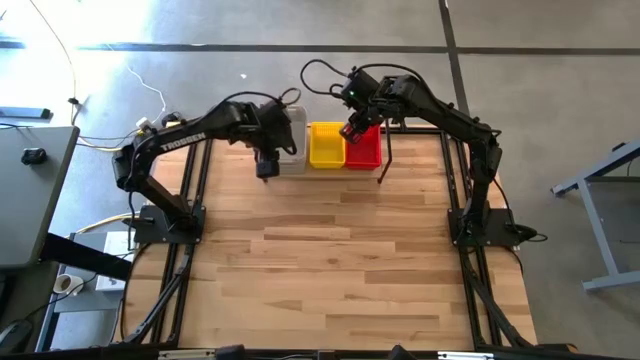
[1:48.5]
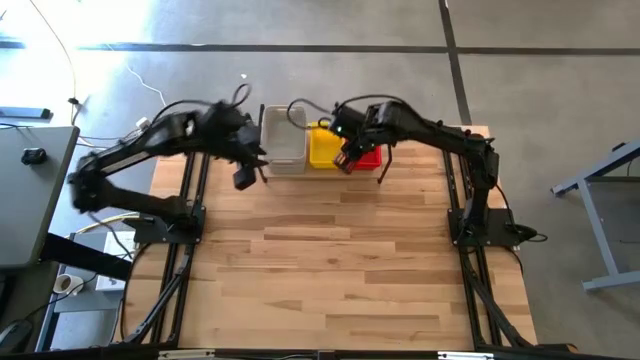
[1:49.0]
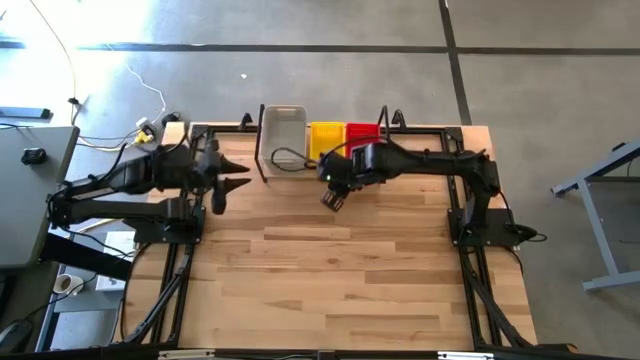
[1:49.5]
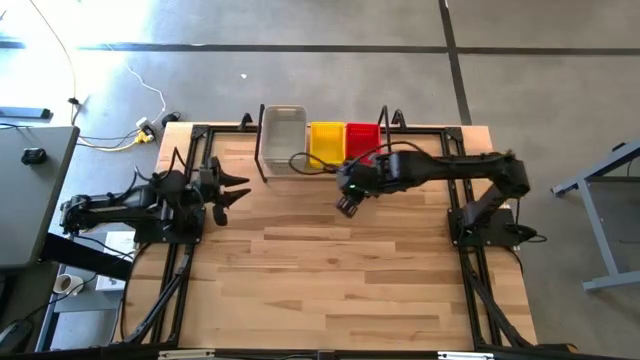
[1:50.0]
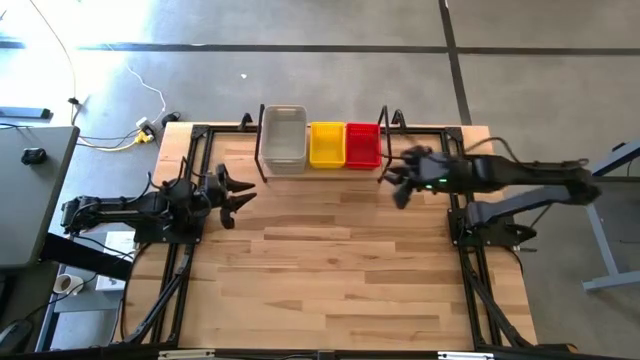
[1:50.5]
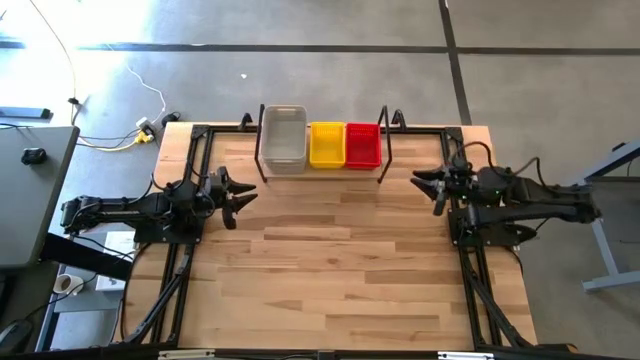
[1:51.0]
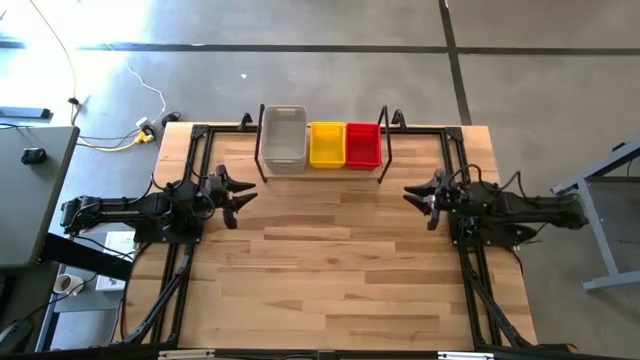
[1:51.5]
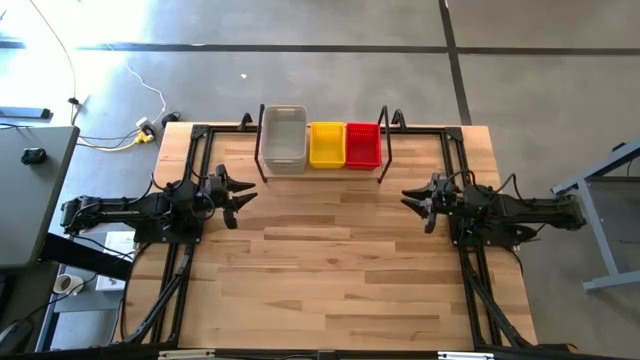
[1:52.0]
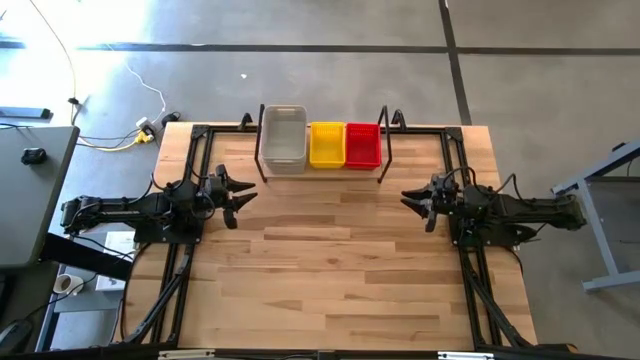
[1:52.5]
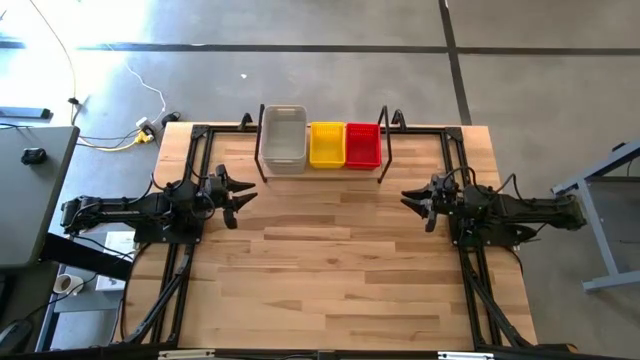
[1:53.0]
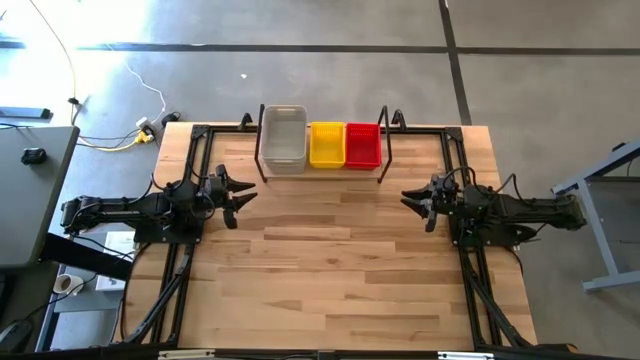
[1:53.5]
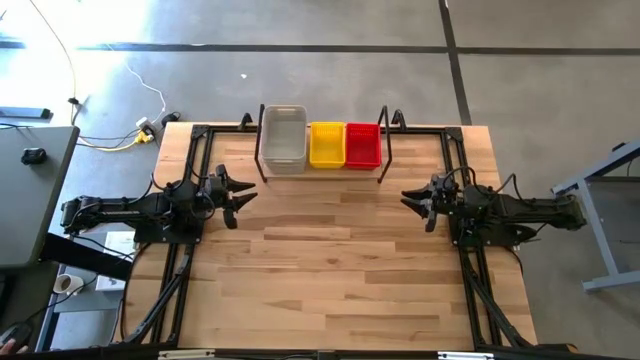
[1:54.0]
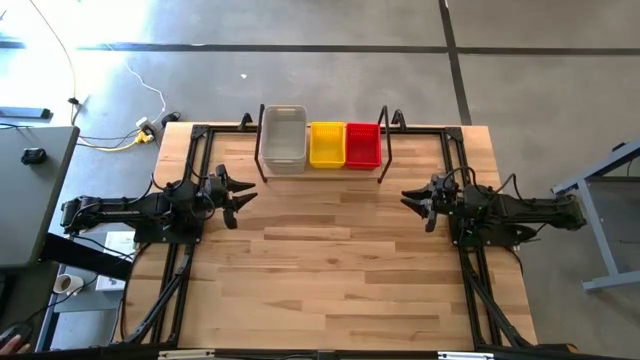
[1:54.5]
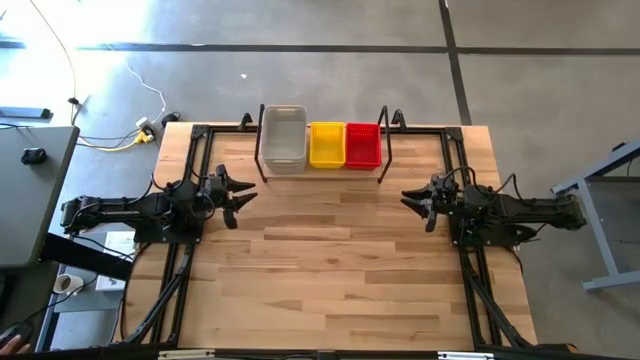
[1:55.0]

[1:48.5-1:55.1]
Task: Stack baskets on shelf by color
Return to Home Position

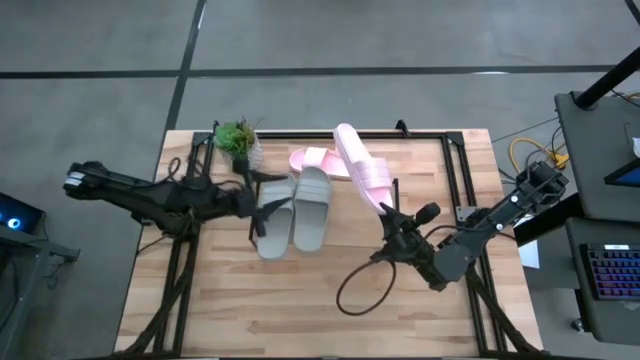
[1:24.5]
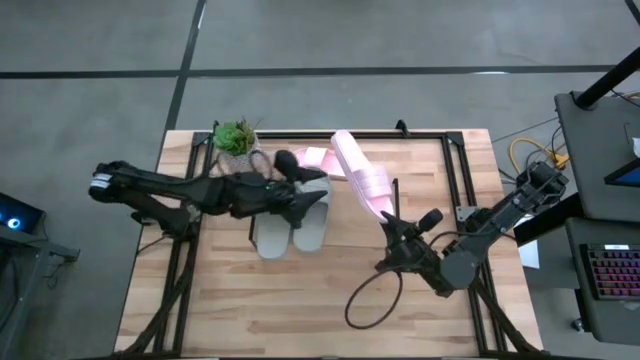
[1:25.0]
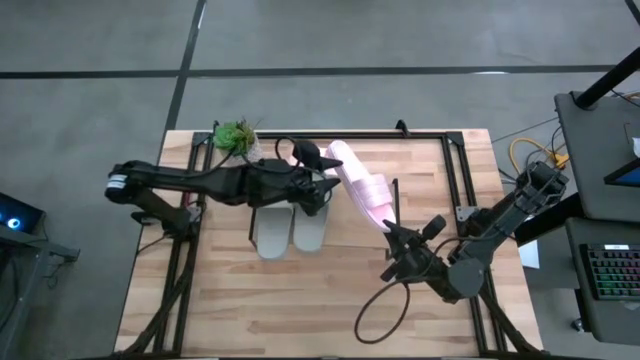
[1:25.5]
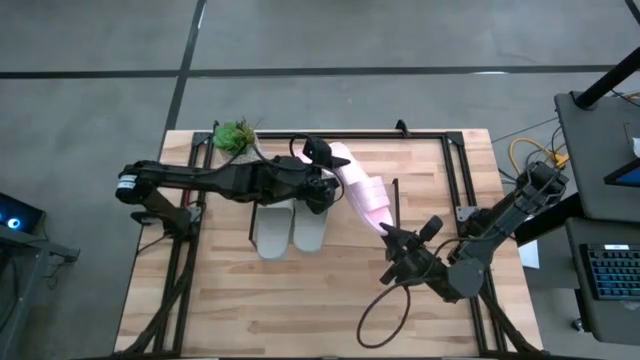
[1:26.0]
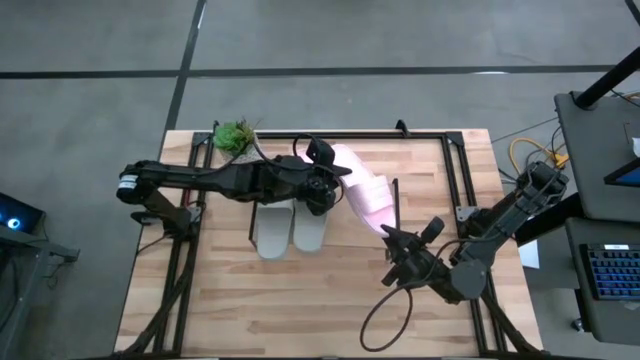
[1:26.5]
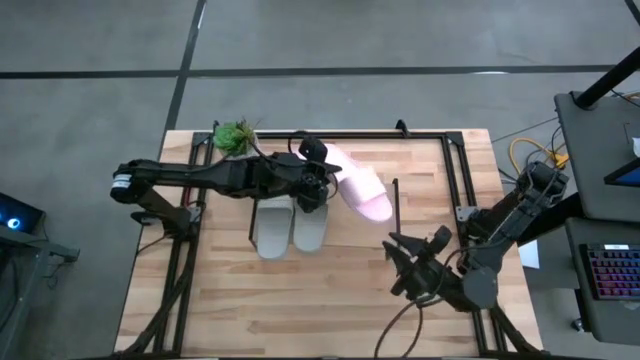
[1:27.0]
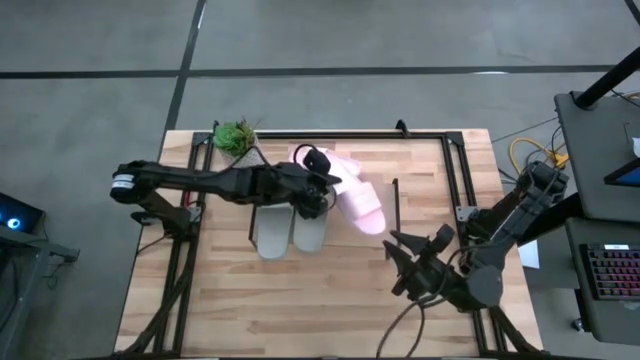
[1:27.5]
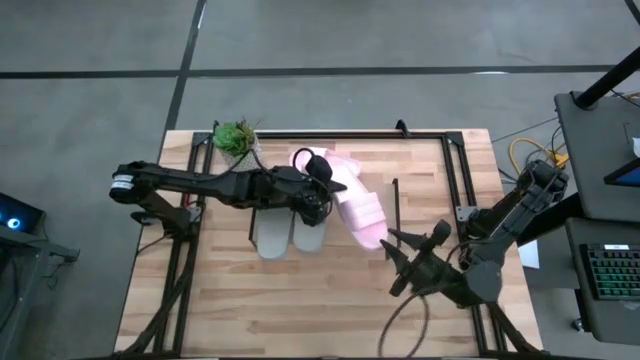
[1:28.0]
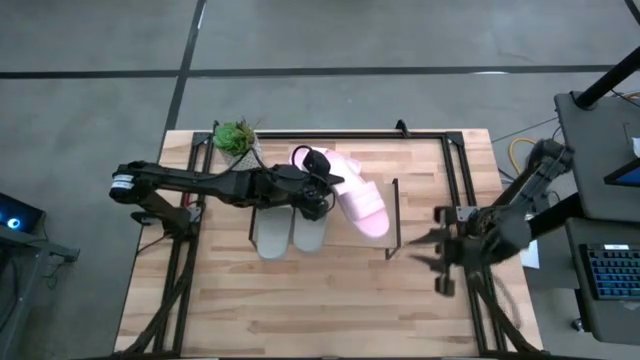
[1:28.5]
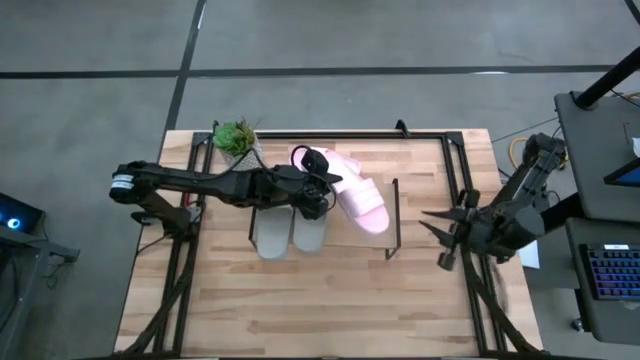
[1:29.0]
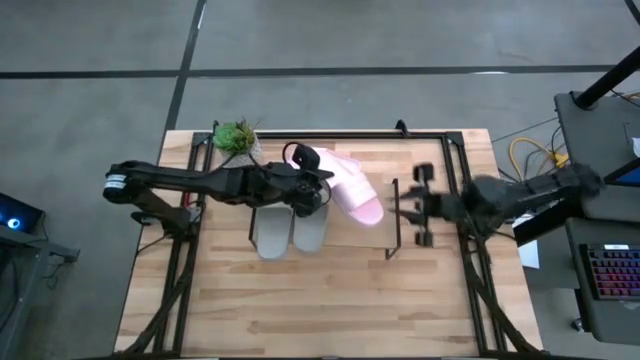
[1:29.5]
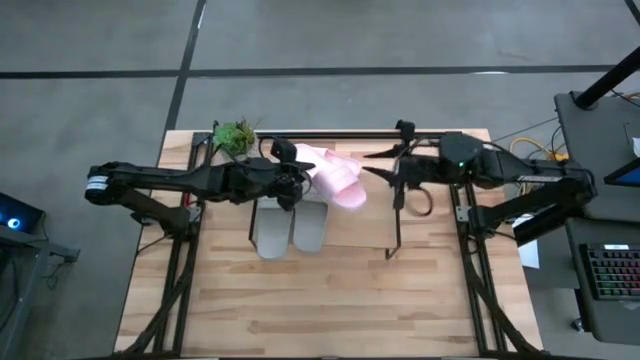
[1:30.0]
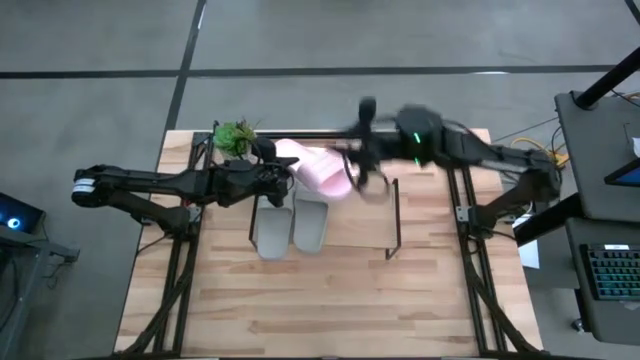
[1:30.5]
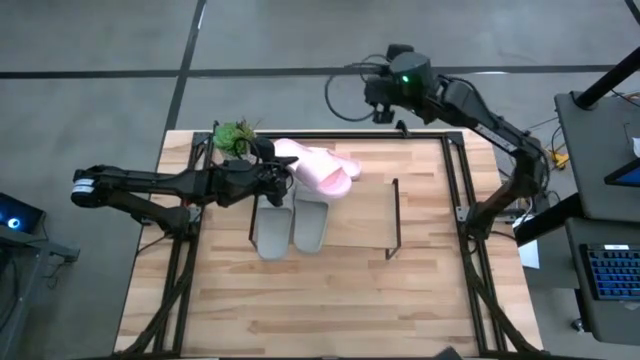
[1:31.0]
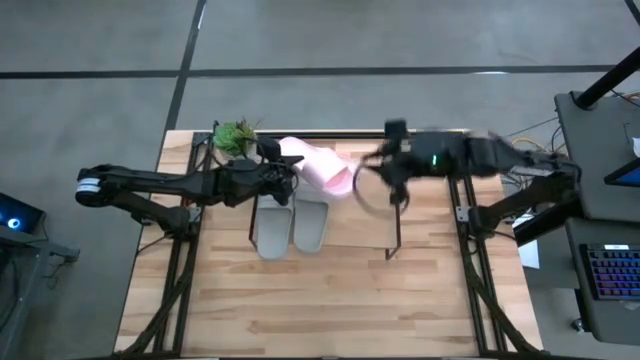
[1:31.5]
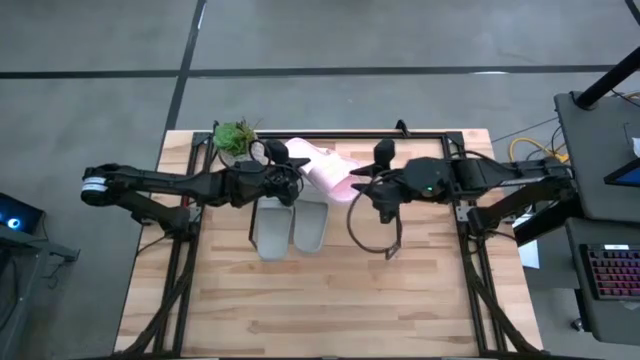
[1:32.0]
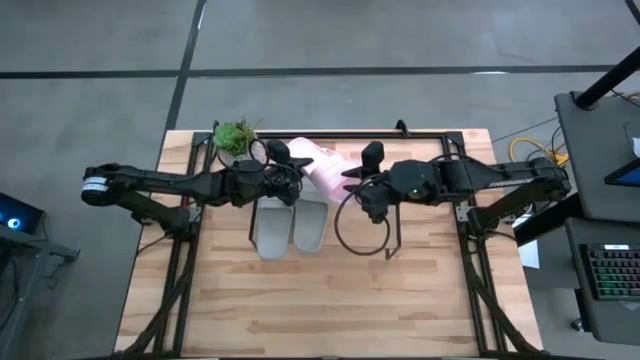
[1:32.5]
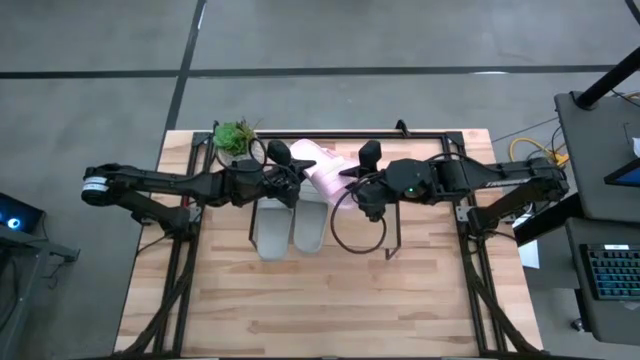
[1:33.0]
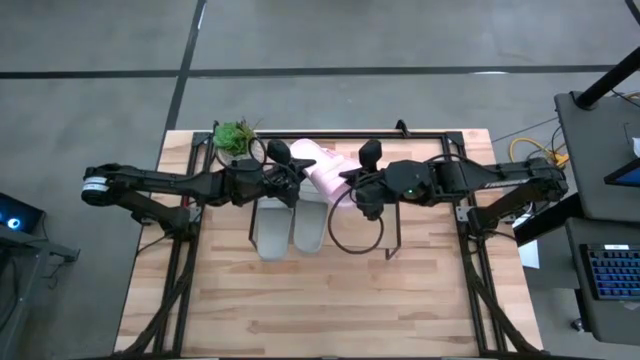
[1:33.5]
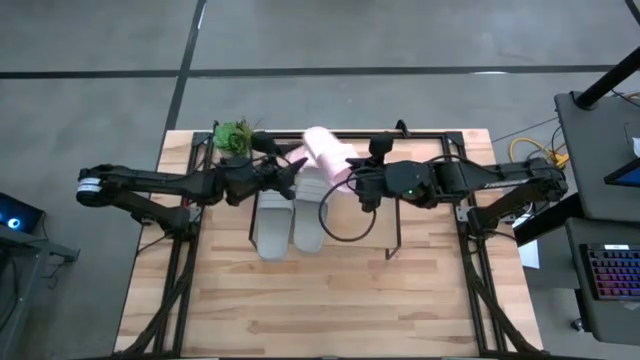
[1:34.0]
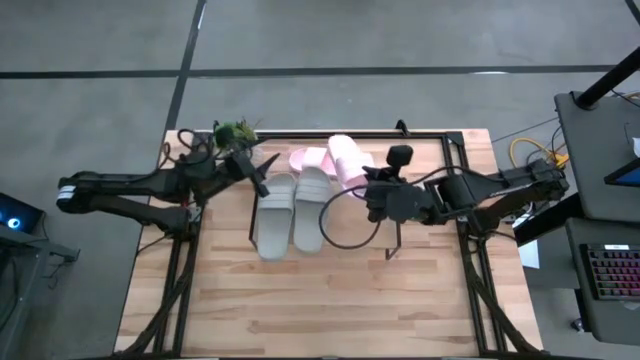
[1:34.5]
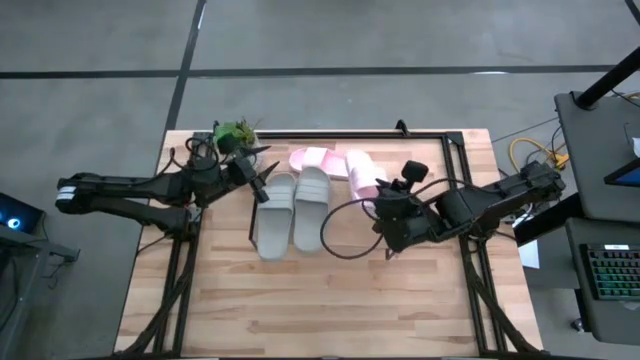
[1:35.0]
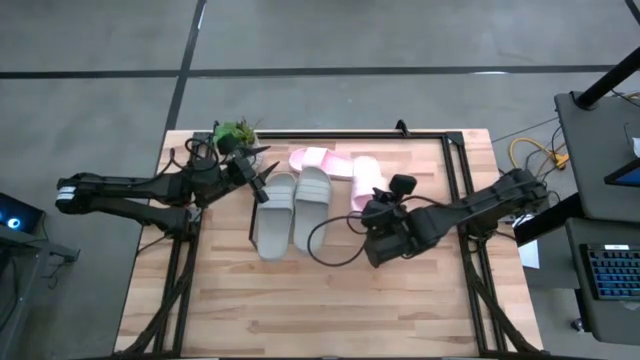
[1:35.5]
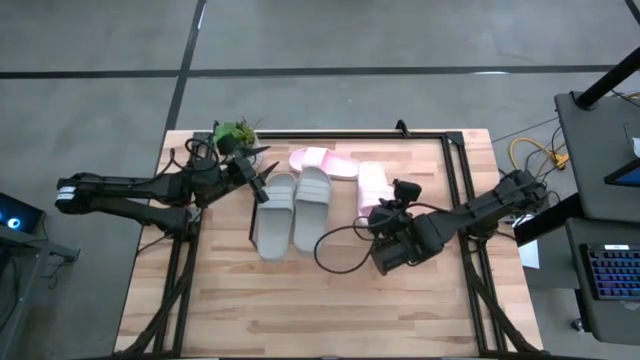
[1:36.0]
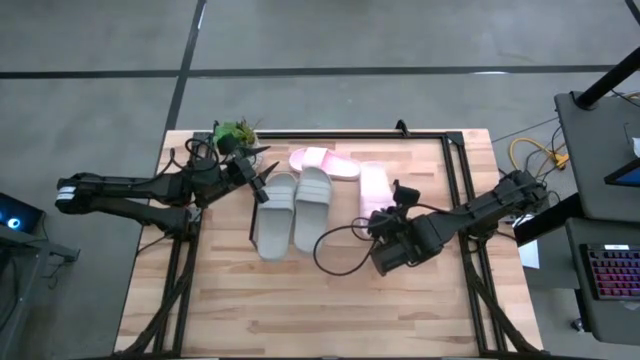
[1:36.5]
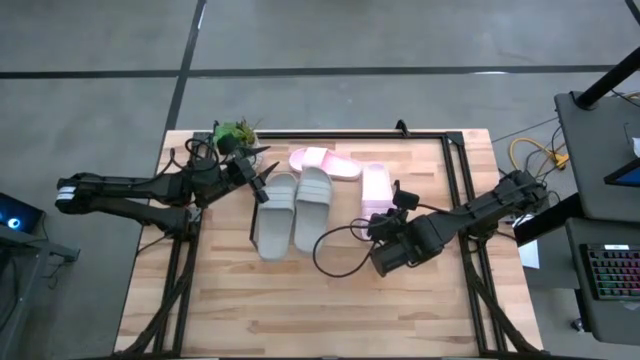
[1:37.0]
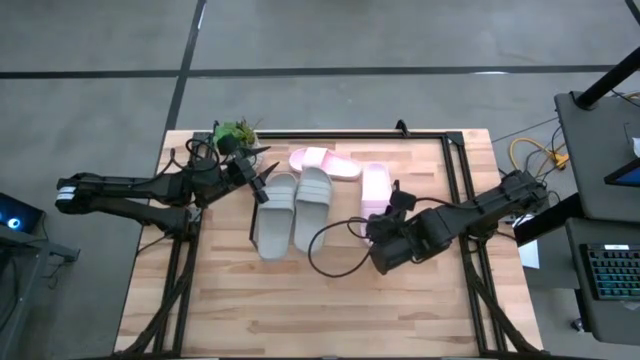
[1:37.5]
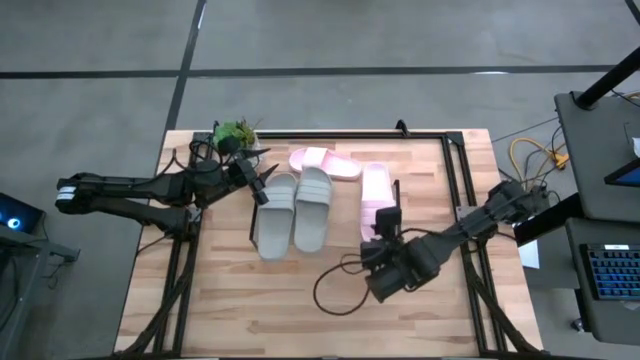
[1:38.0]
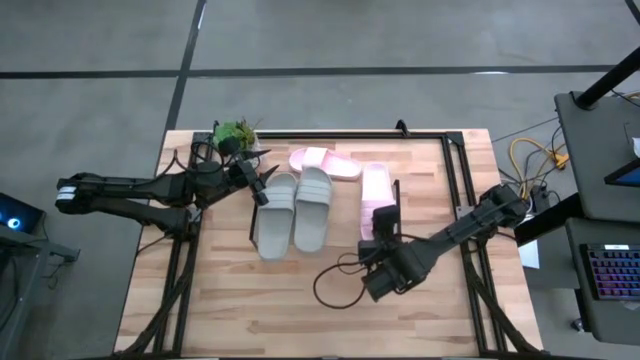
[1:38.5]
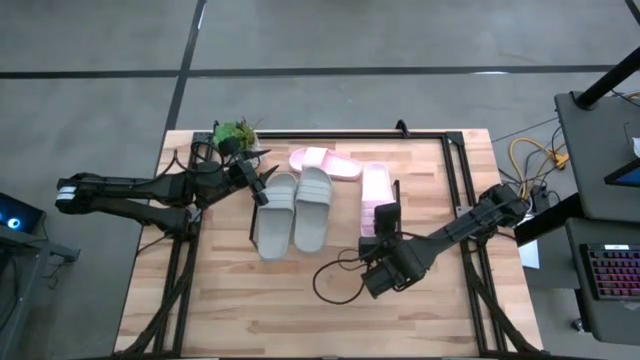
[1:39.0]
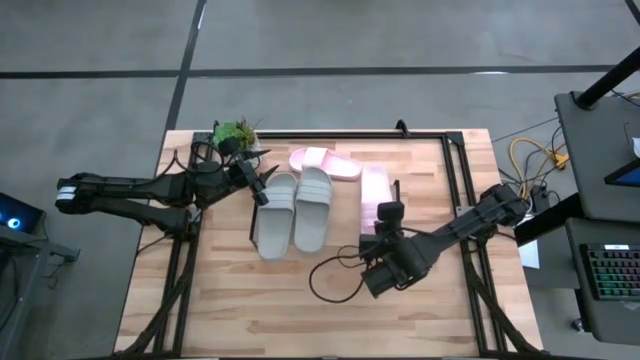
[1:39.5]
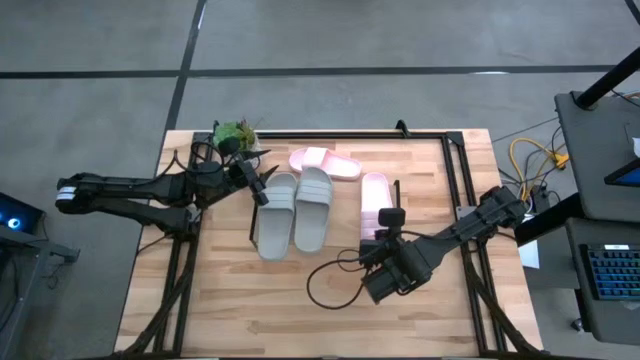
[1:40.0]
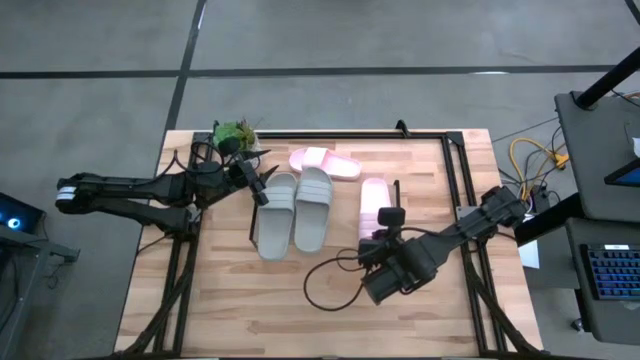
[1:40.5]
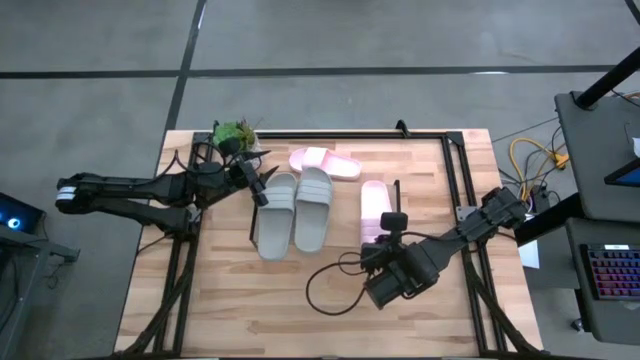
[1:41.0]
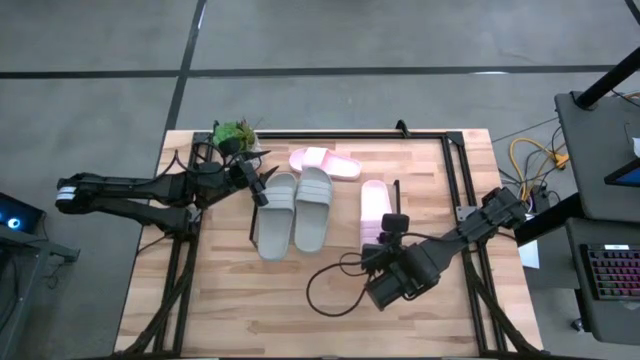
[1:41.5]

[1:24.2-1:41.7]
Task: Pick and place slides into the shelf
Put the bottom pink slide on the shelf
